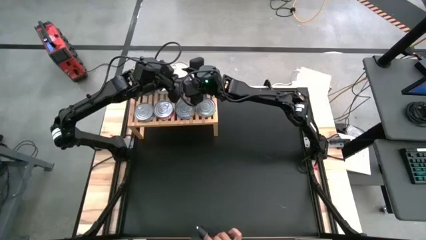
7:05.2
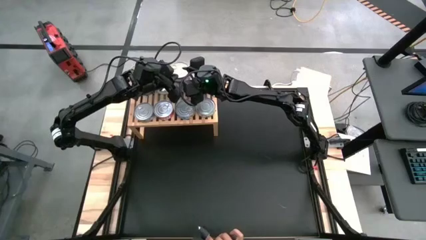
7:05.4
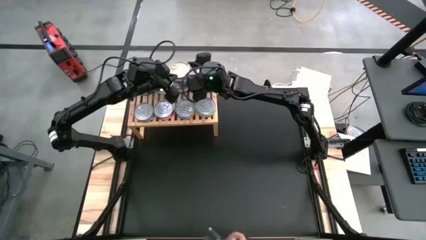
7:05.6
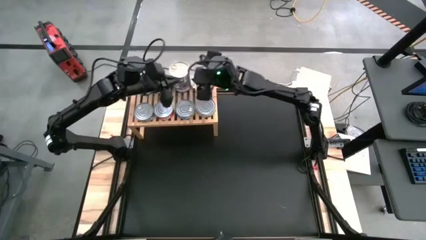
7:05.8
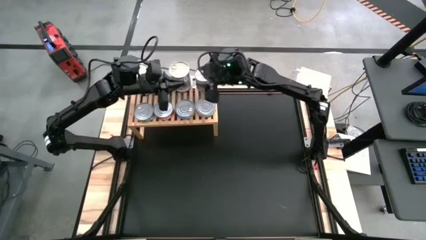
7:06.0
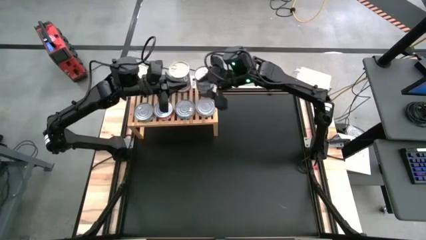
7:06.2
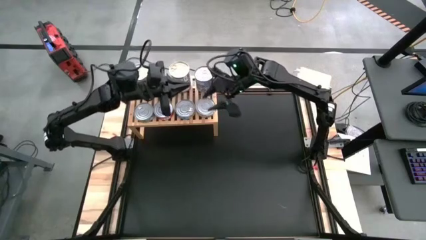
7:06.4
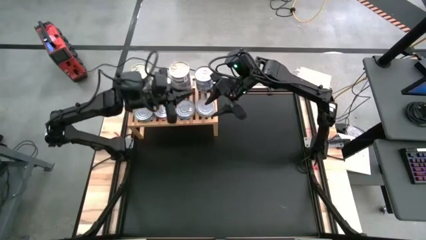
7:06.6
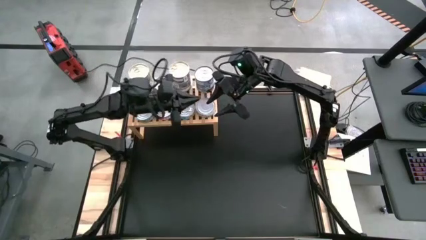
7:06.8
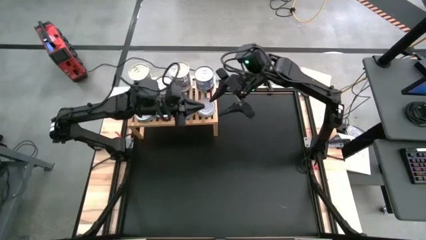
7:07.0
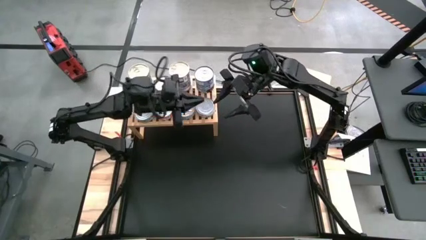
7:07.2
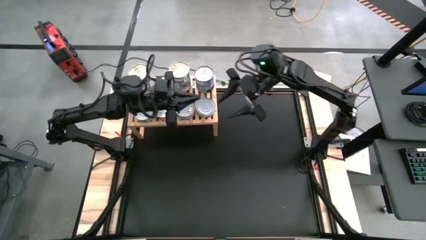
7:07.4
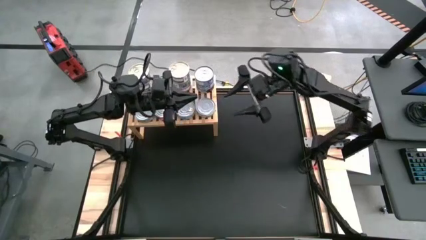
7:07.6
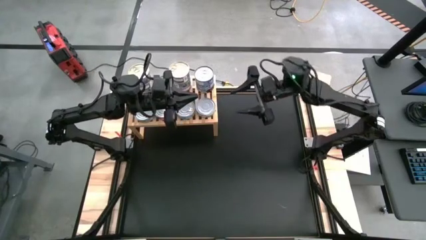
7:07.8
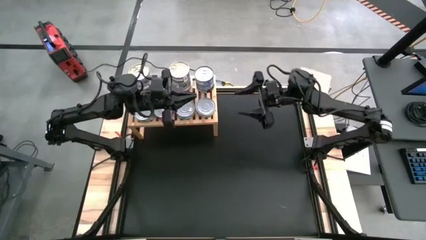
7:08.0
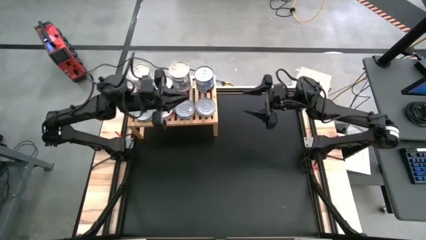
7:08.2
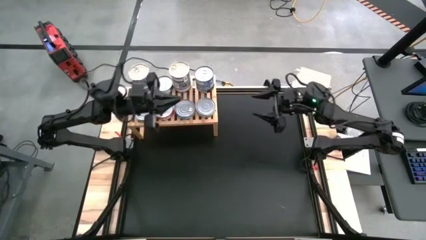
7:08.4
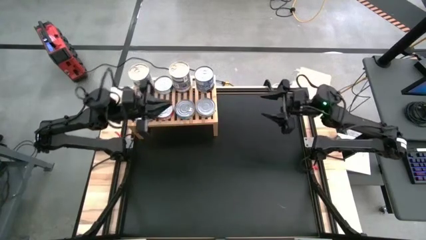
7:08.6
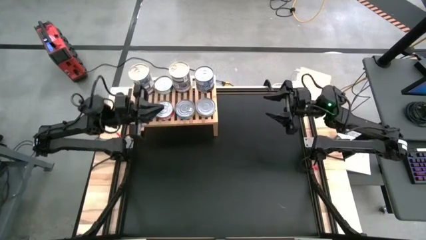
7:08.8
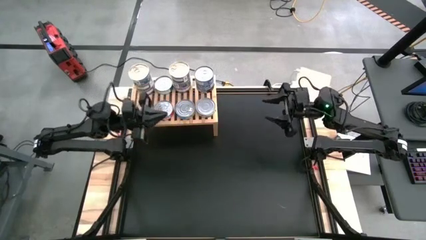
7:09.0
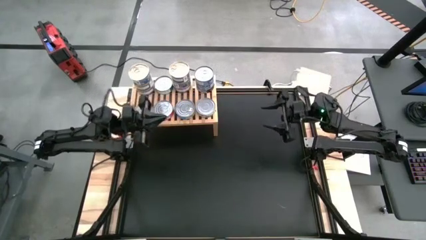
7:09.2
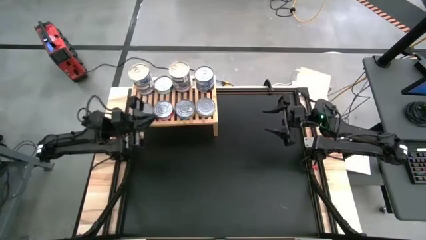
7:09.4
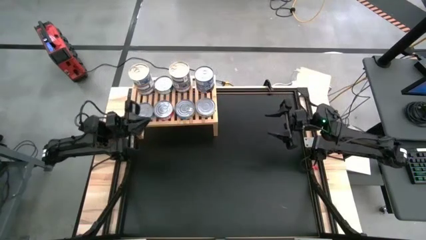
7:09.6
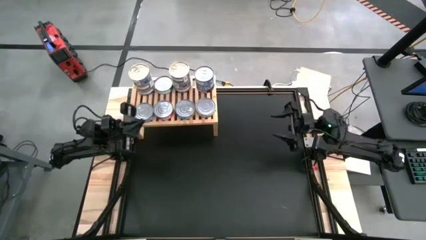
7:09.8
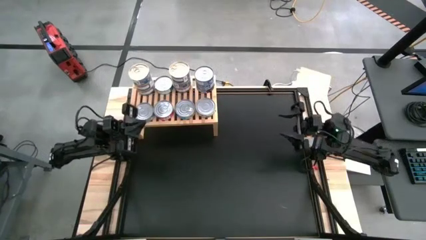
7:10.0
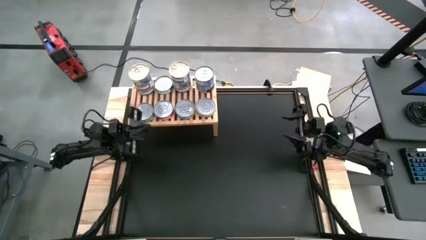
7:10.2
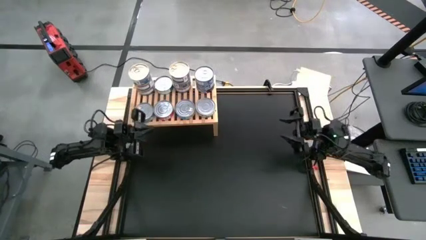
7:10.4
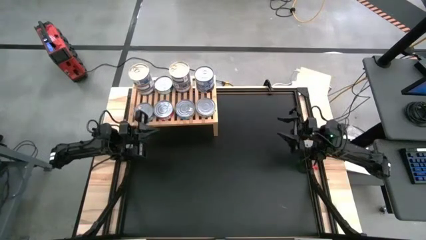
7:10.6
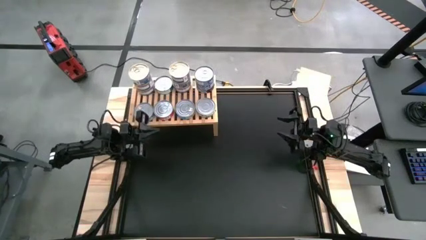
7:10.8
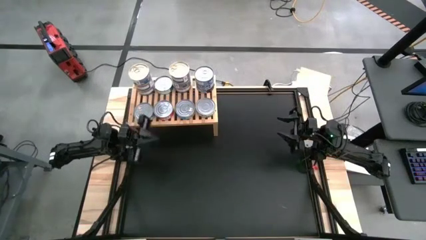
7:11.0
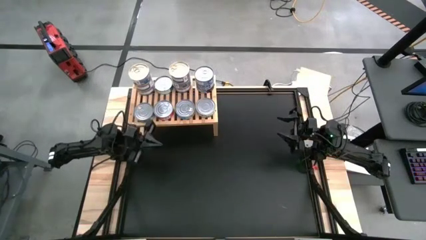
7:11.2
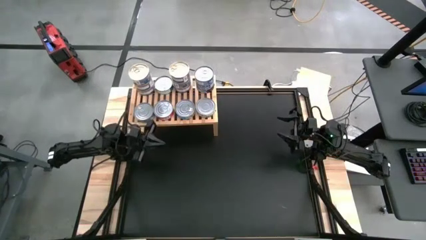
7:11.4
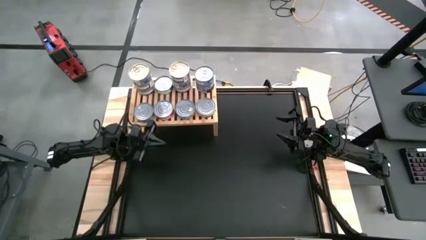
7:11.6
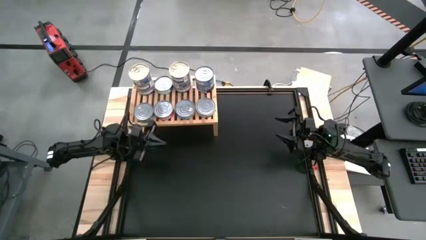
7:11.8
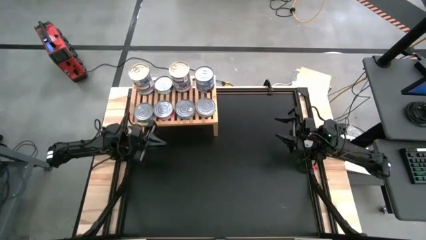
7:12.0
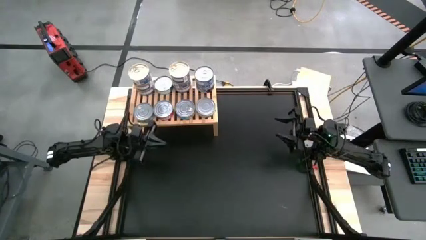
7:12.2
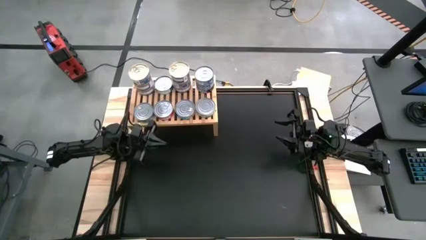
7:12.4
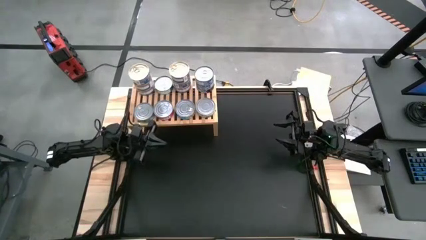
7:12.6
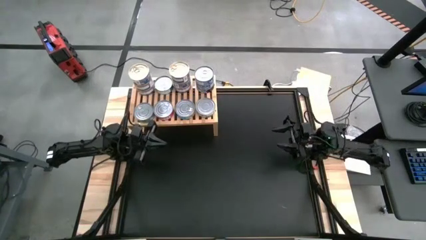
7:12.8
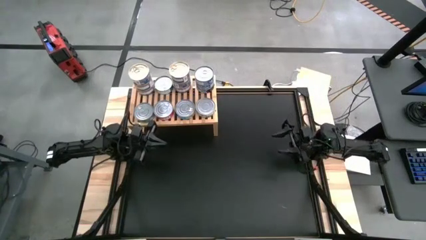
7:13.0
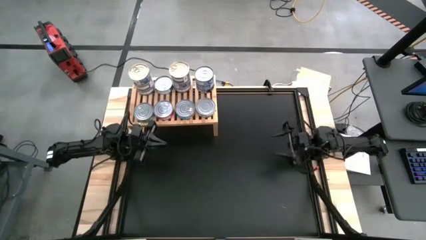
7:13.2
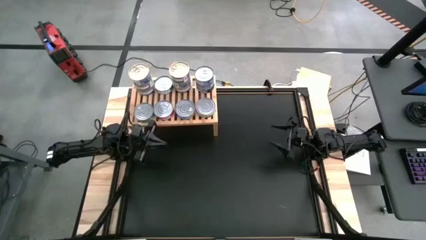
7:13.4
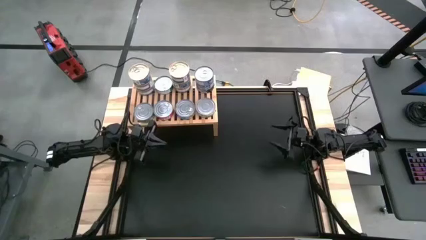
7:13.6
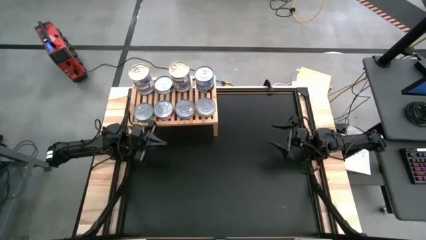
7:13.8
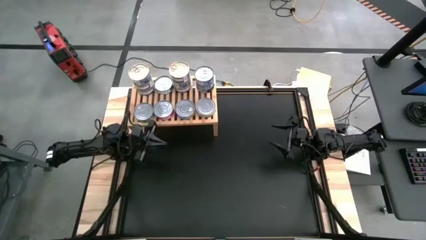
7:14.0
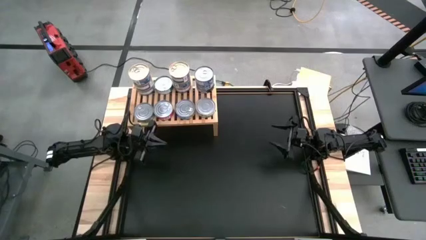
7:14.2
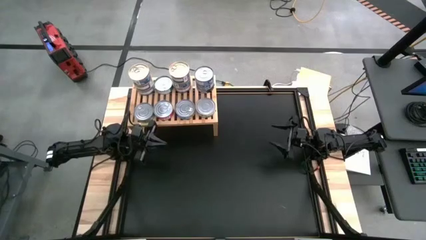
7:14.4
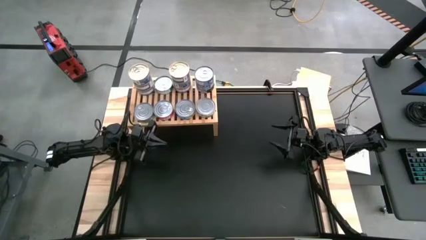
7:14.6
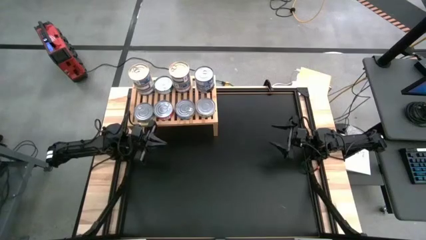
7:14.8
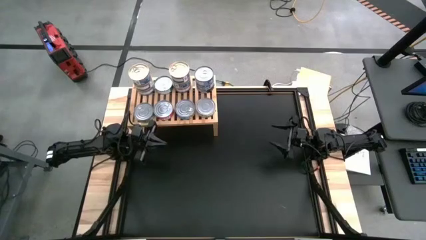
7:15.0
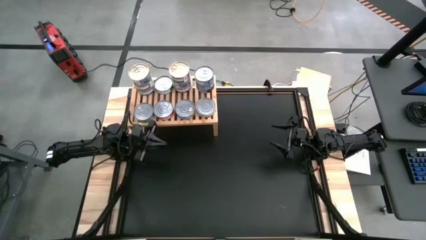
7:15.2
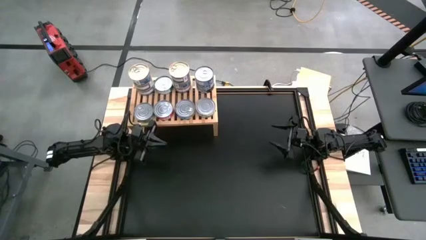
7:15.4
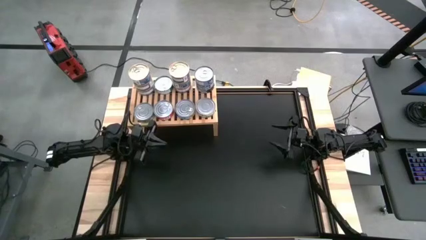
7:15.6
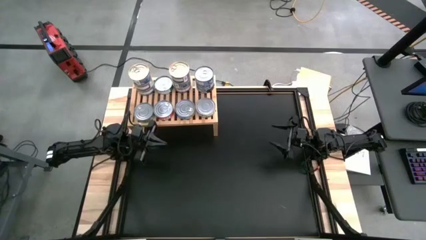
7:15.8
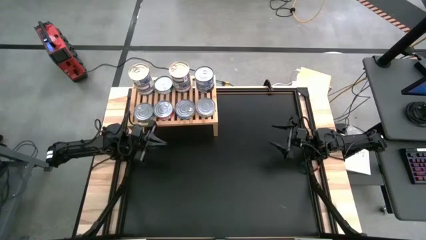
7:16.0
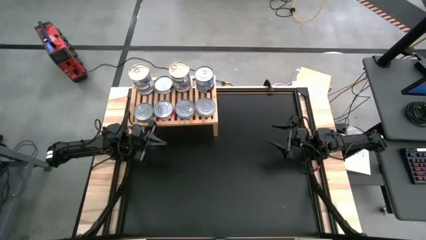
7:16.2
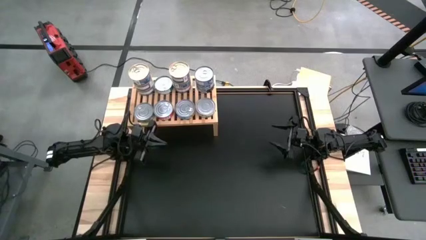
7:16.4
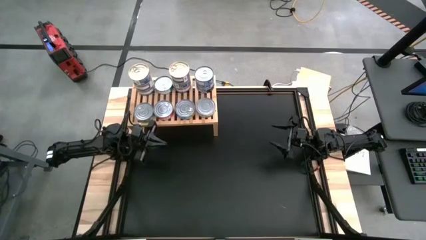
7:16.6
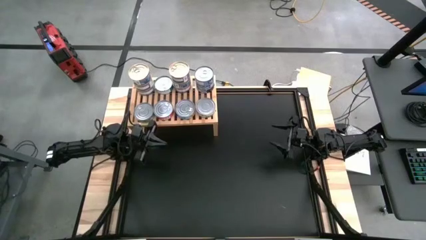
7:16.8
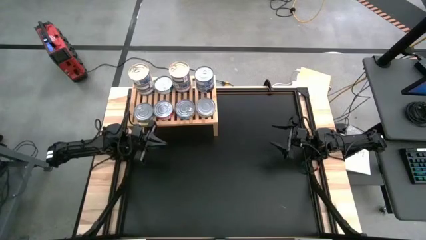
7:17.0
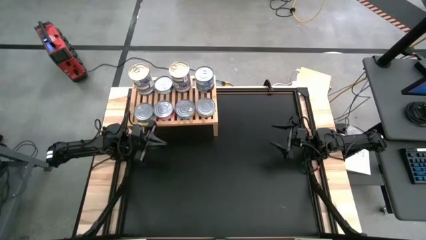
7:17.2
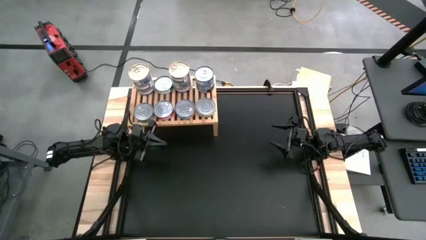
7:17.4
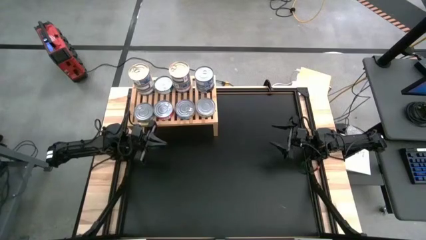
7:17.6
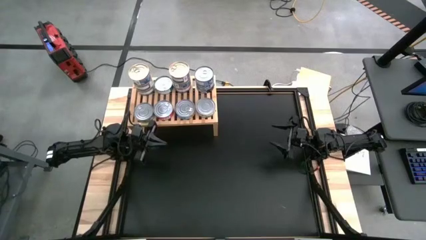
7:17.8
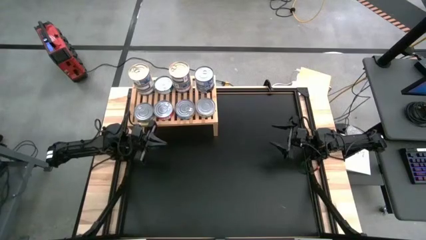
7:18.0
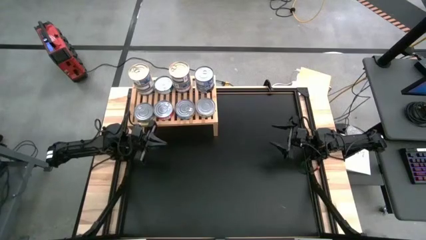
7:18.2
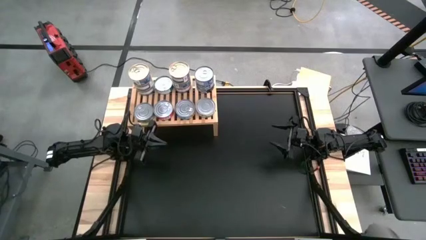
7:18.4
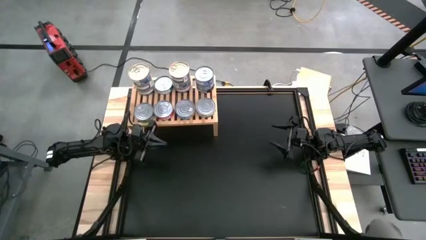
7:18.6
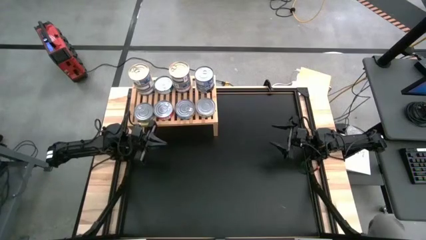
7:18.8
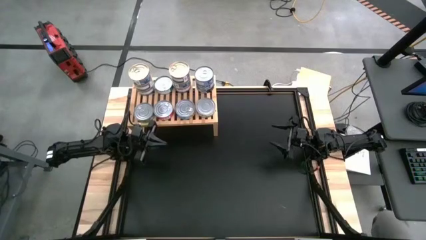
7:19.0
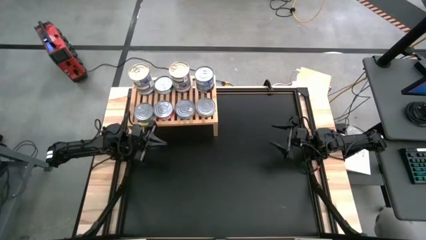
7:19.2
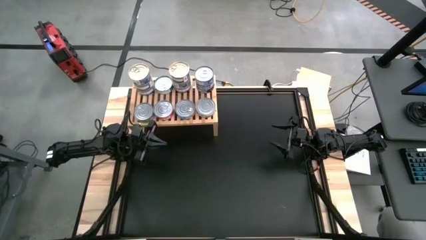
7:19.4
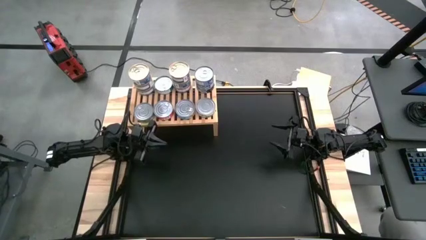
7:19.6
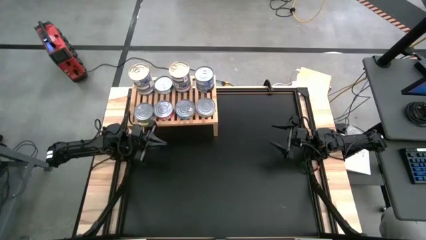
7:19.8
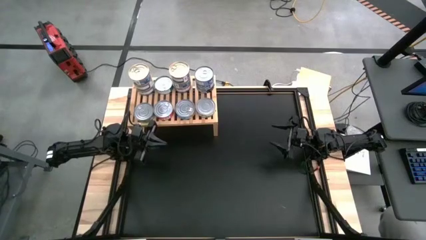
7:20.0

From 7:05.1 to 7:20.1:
Task: Stack canned seafood by type on shelf
Return to Home Position
